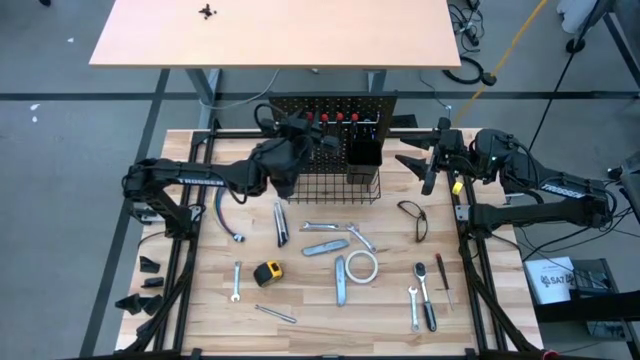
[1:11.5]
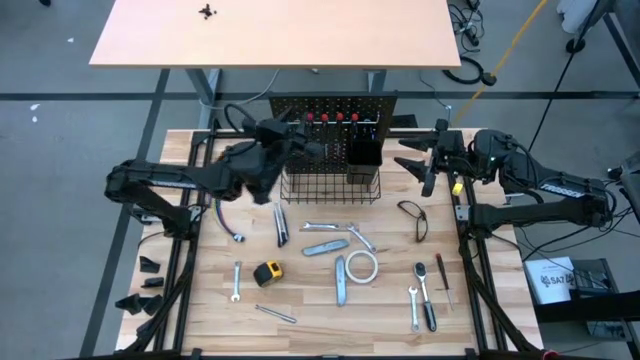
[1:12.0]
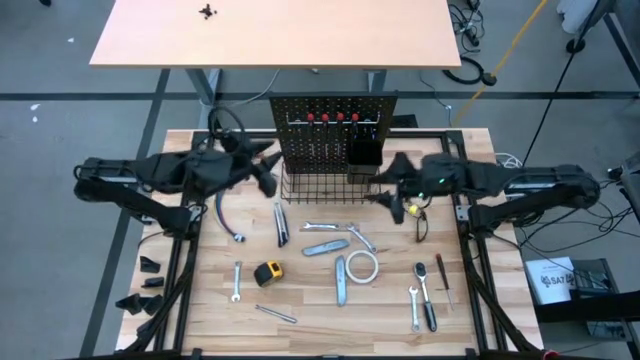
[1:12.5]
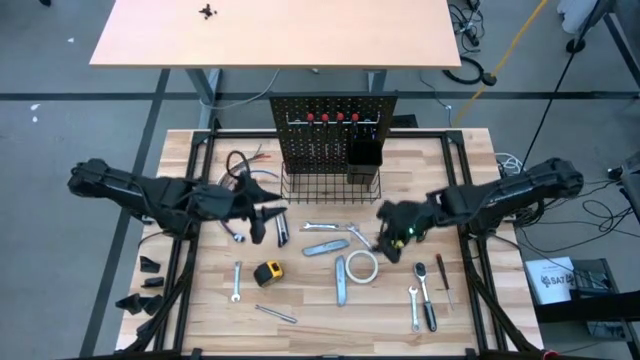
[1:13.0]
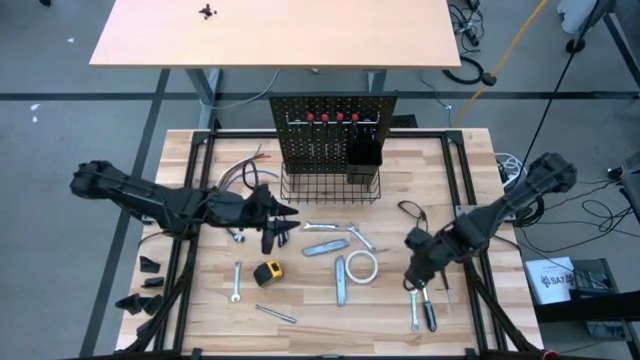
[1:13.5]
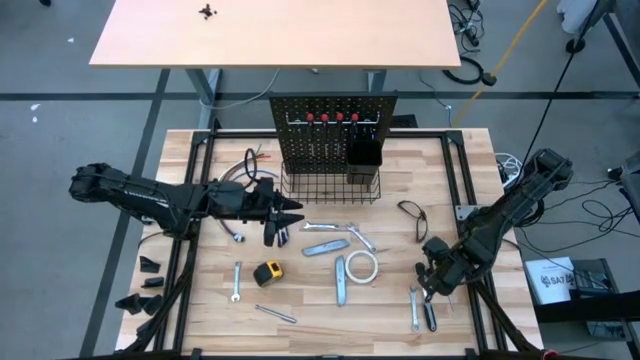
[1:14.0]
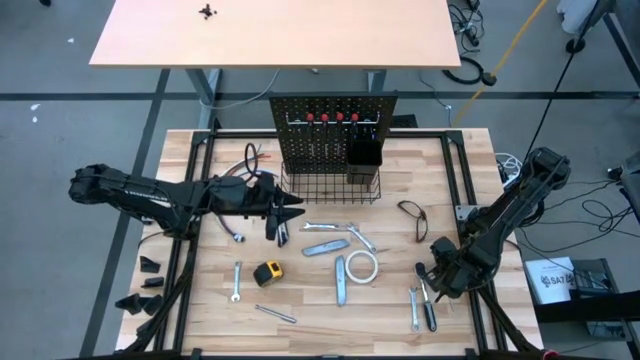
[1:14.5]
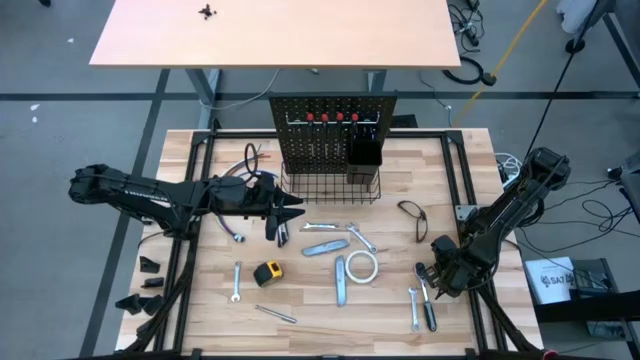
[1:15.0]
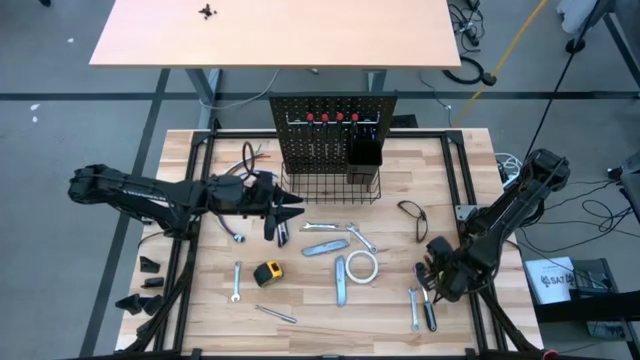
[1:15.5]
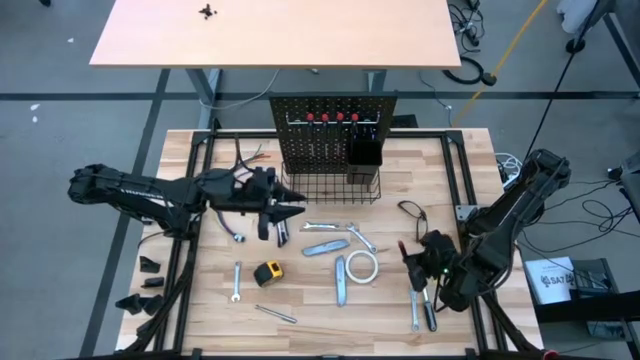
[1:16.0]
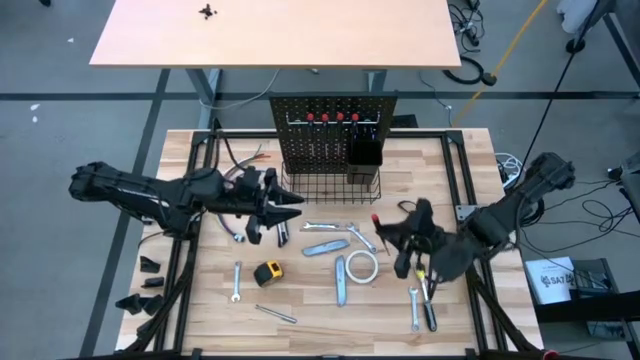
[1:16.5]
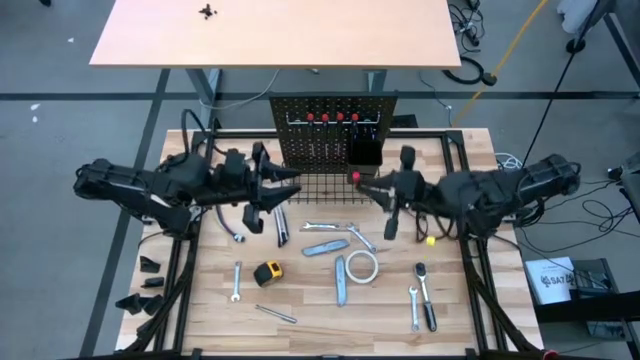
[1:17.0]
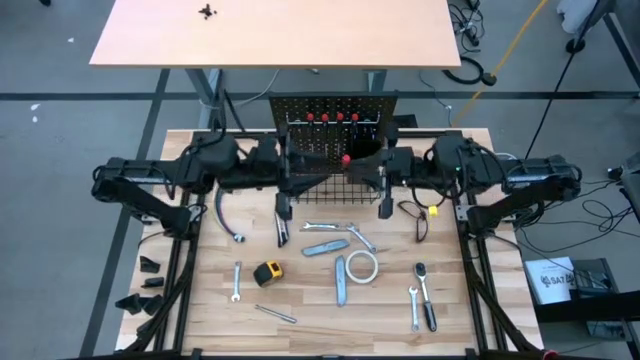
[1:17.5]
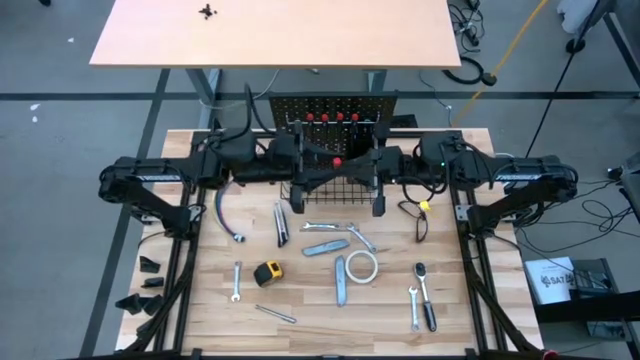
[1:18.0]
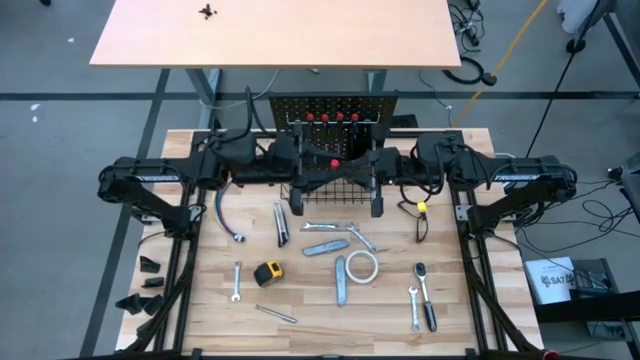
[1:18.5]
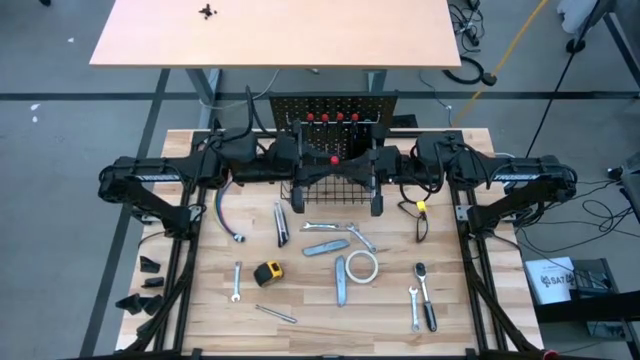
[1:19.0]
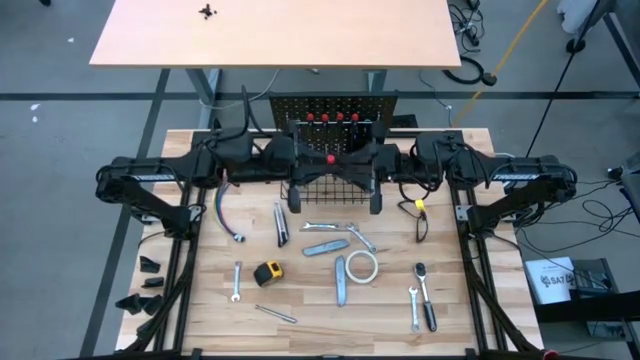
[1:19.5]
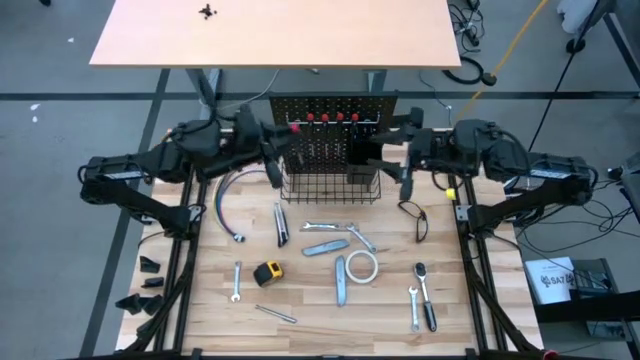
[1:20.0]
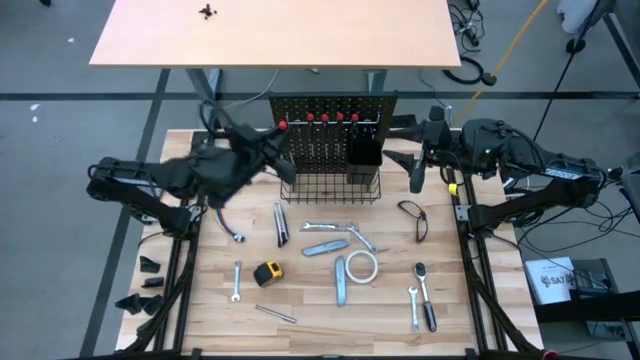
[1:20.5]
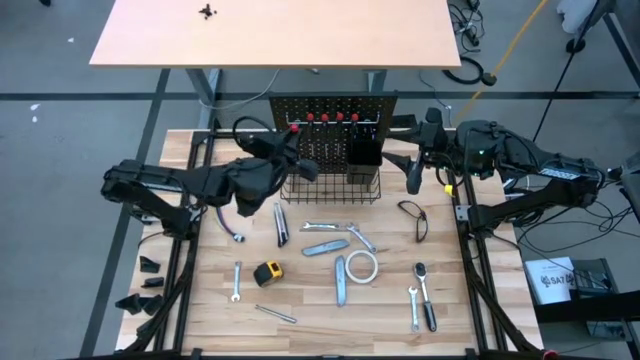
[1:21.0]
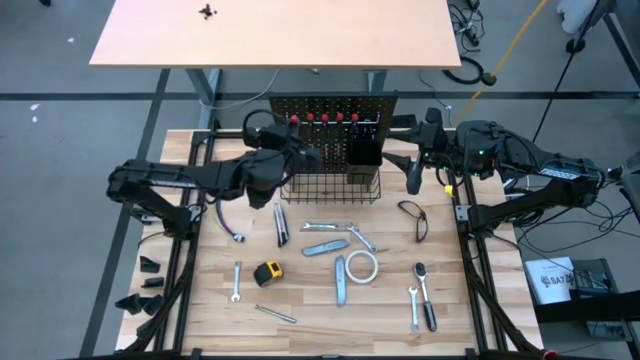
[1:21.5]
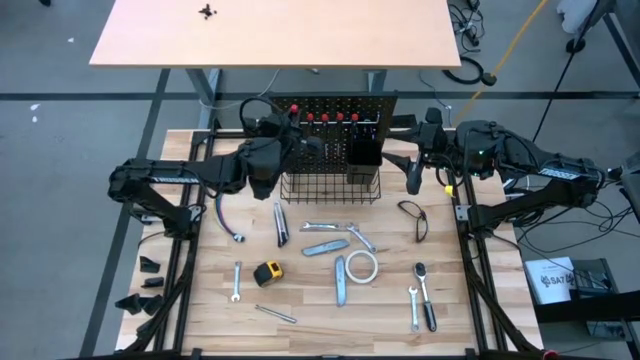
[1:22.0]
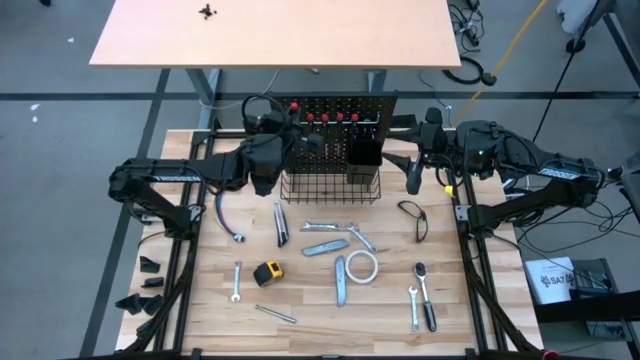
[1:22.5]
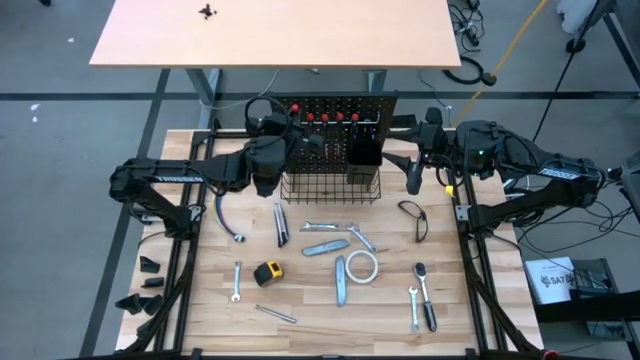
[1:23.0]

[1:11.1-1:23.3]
Task: Hang tools onto peg board
Hang the nut driver onto the pegboard

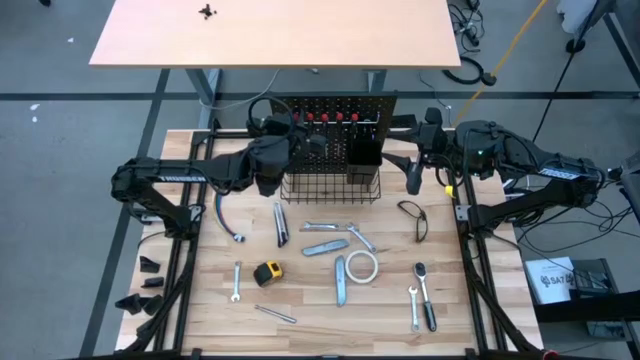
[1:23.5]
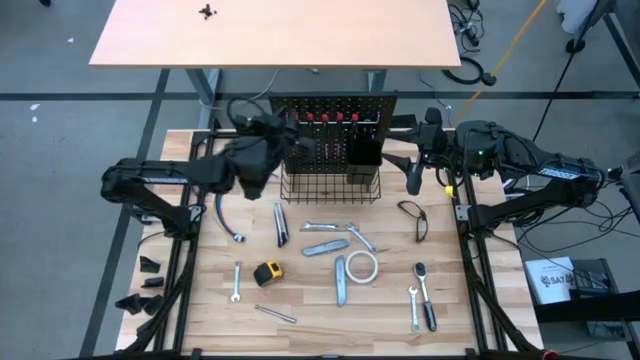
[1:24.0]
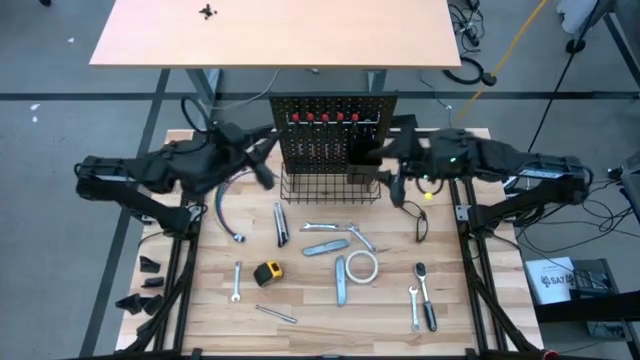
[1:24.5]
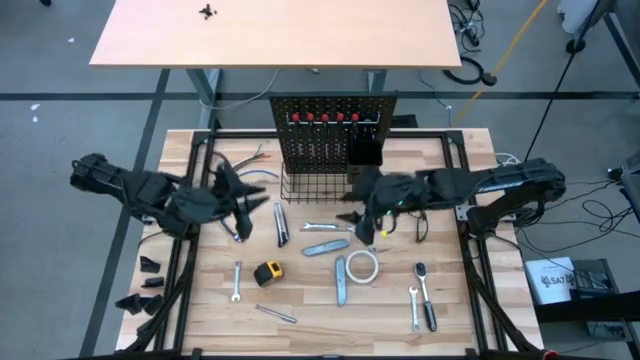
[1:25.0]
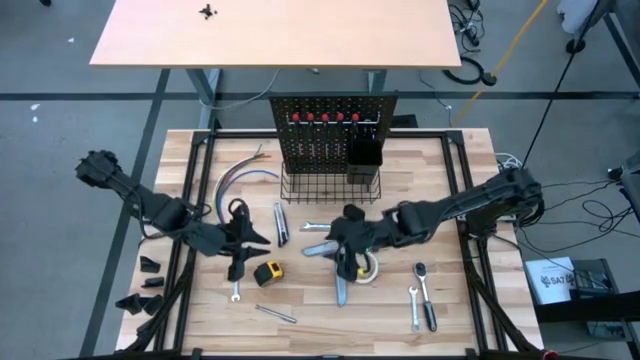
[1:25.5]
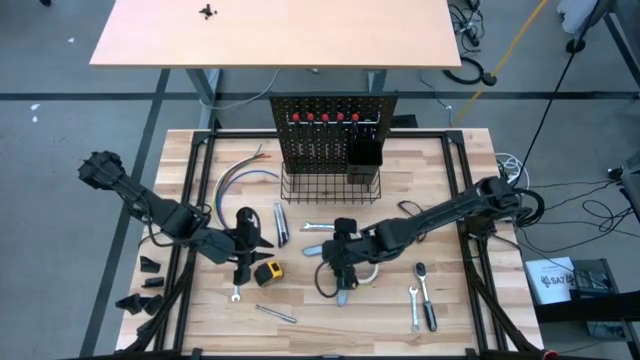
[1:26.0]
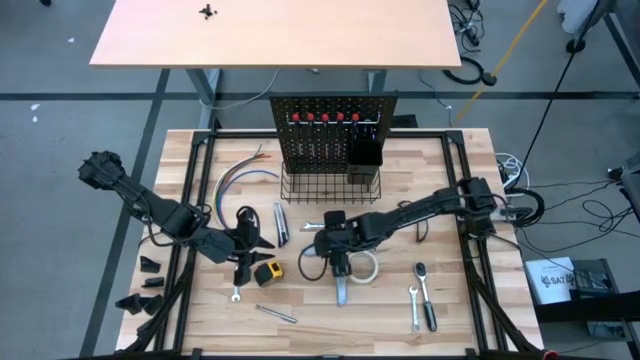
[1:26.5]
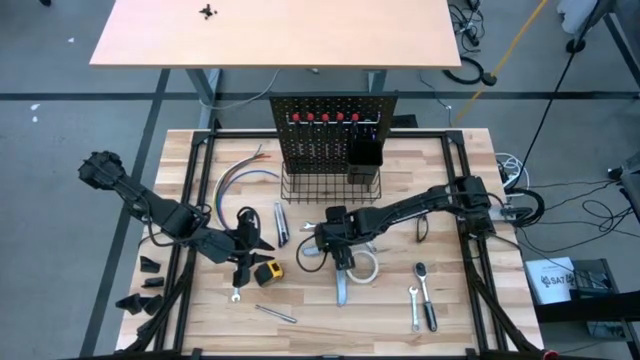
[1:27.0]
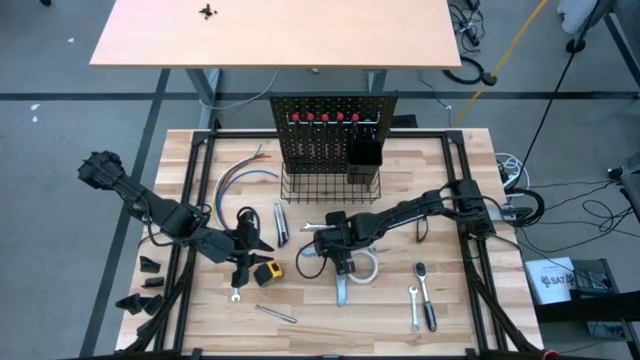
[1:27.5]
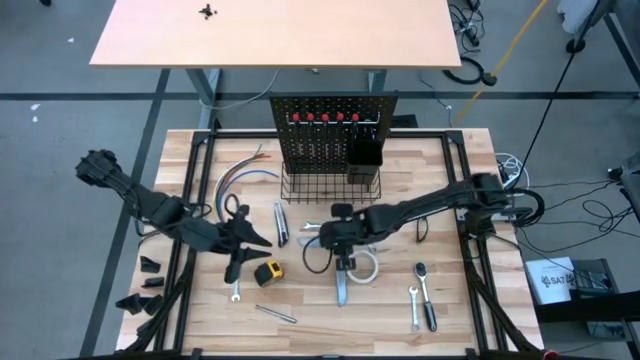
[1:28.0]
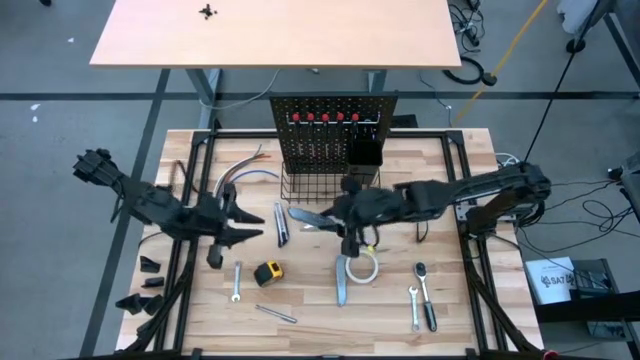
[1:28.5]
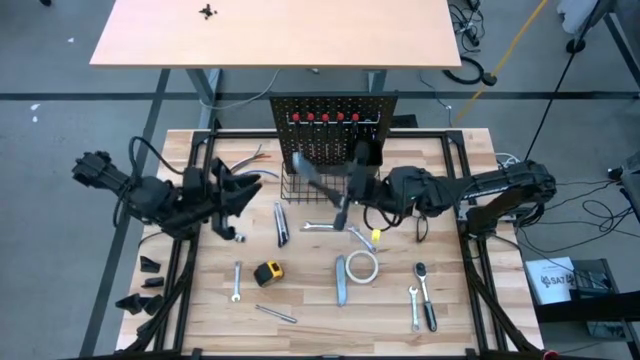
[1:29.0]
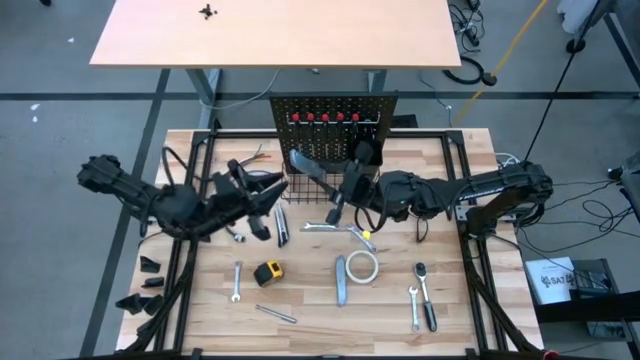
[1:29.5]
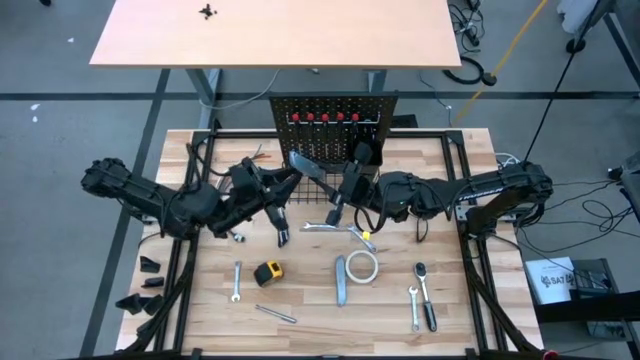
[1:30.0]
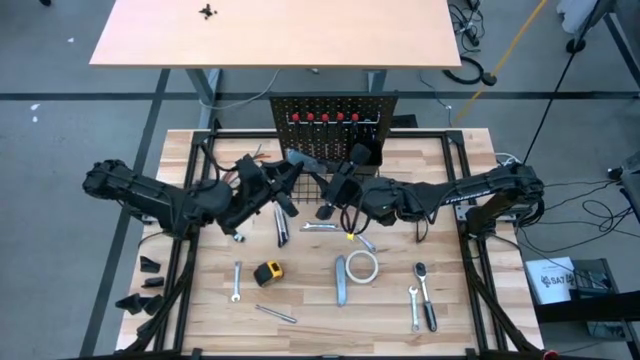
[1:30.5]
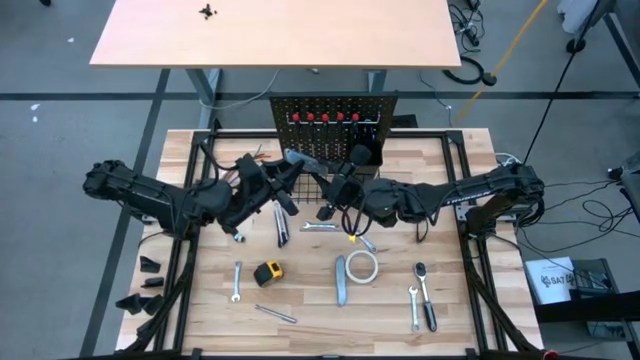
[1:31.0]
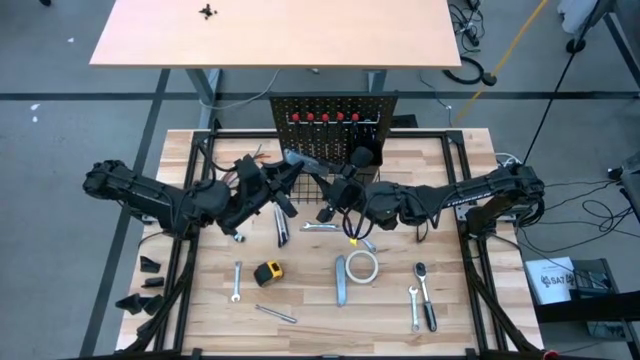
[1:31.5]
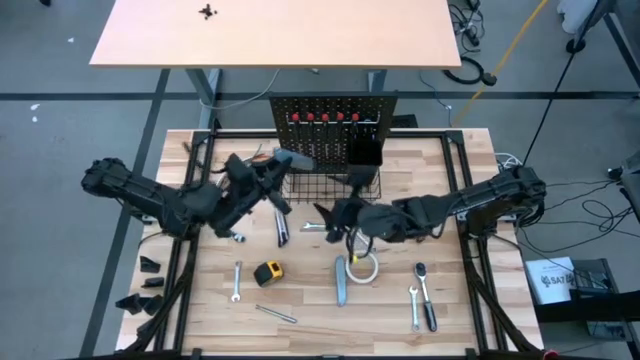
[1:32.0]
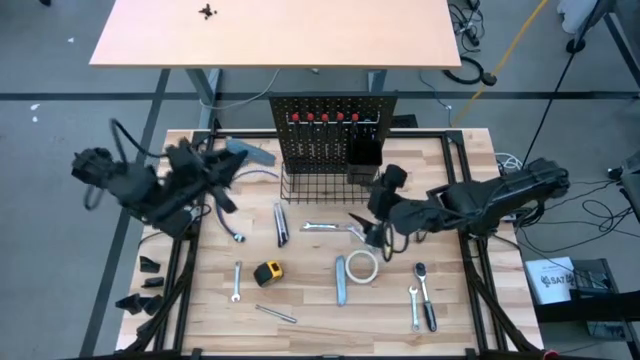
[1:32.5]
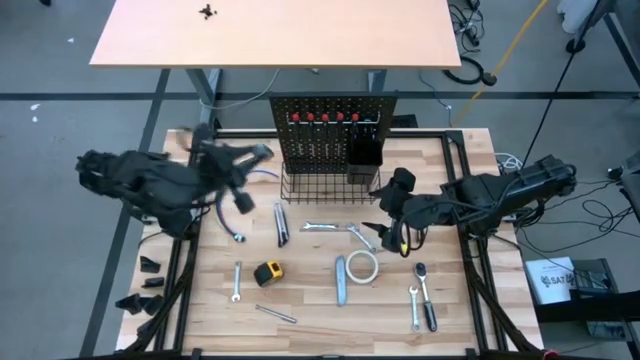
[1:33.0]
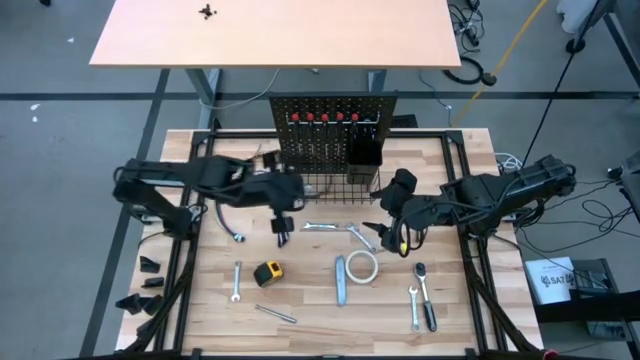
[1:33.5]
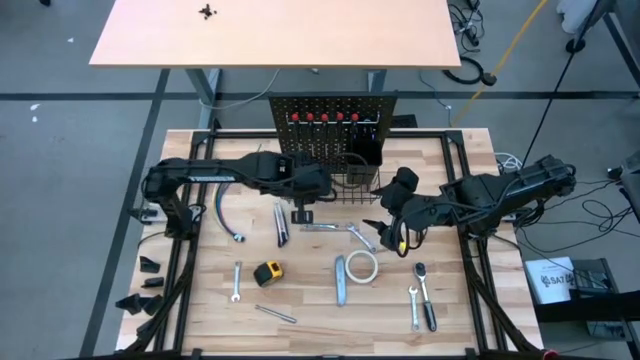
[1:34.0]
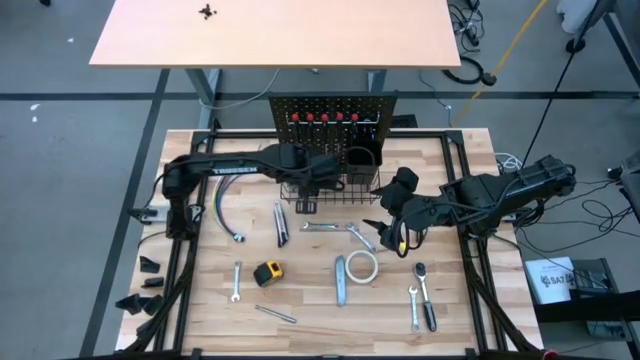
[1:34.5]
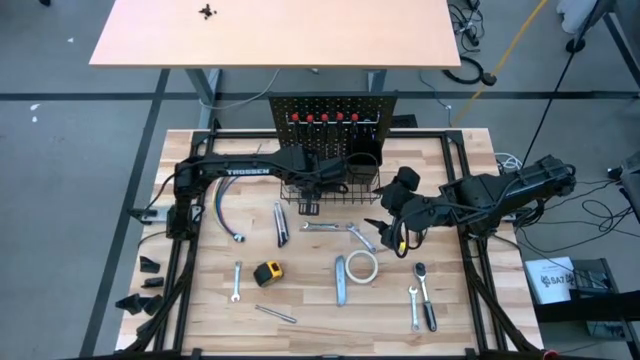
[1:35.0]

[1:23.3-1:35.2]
Put the silver utility knife into the pegboard basket
